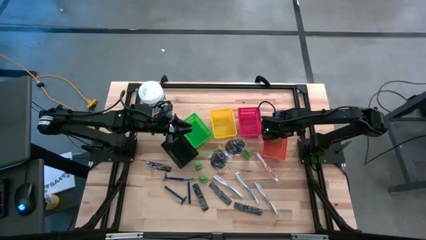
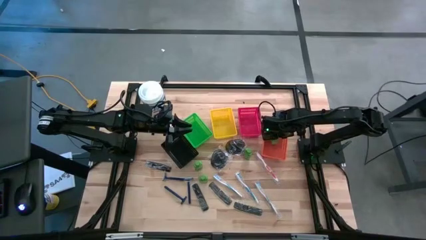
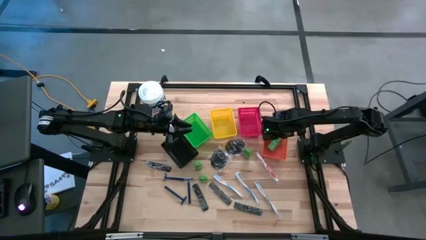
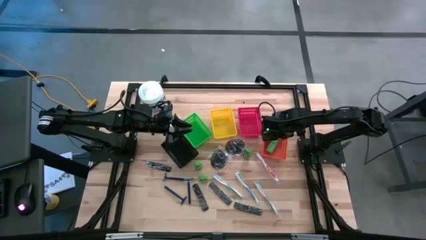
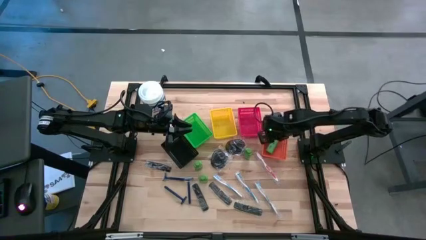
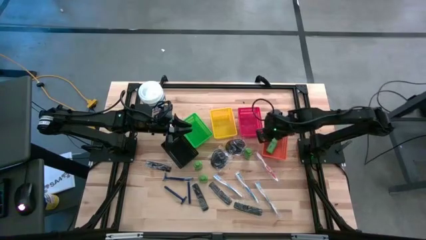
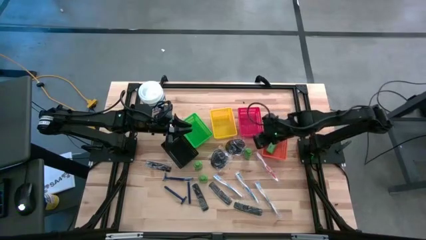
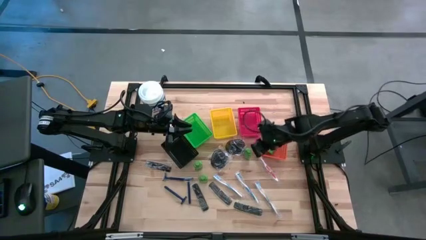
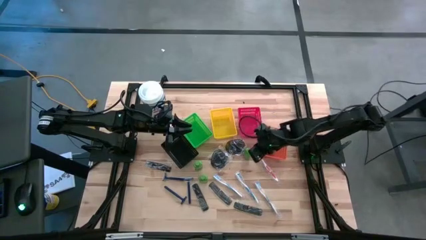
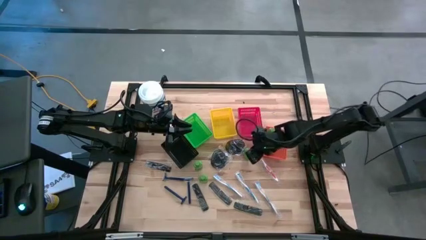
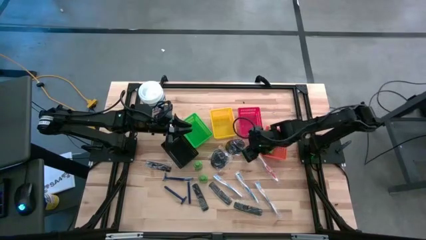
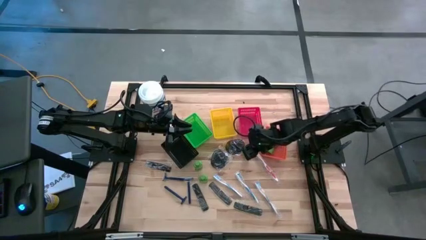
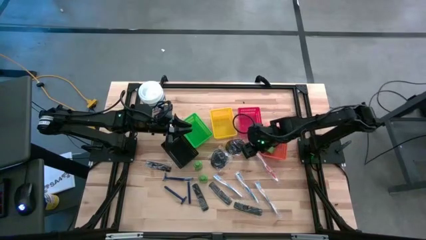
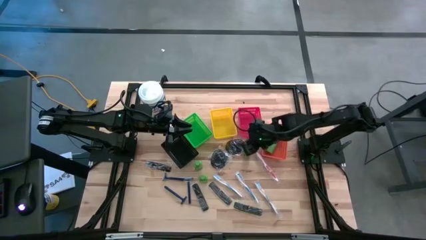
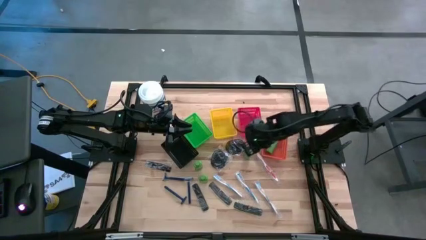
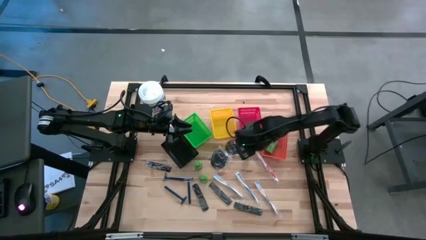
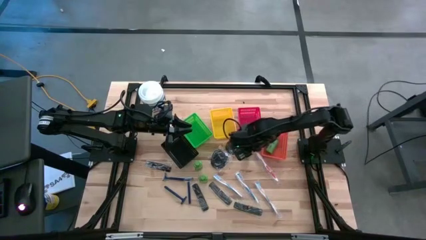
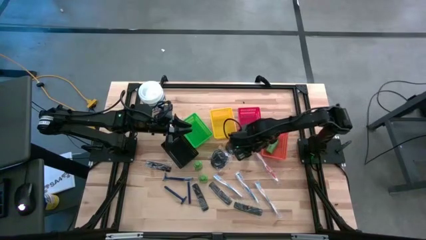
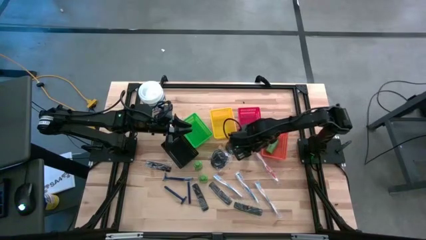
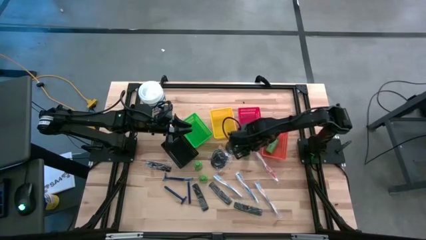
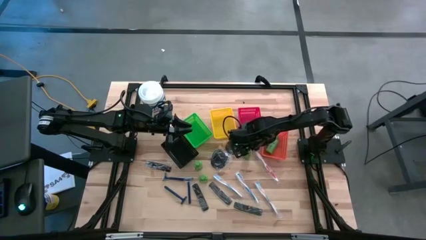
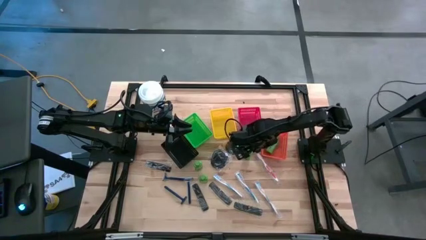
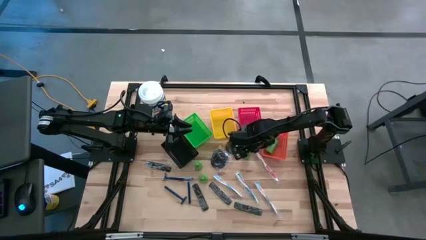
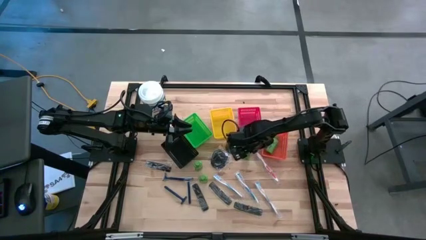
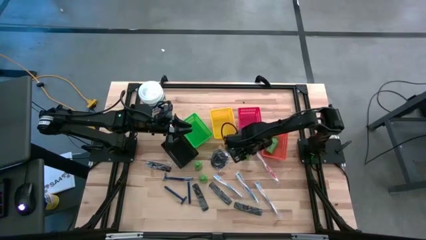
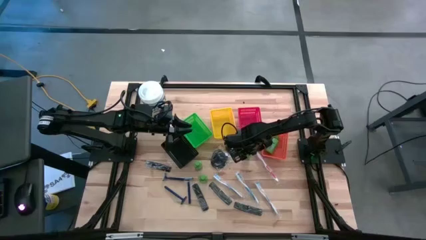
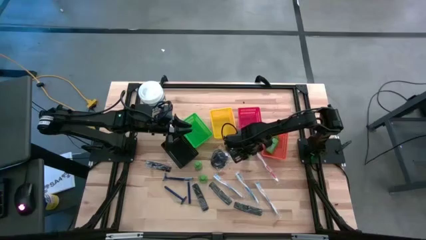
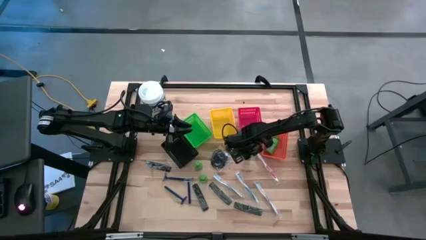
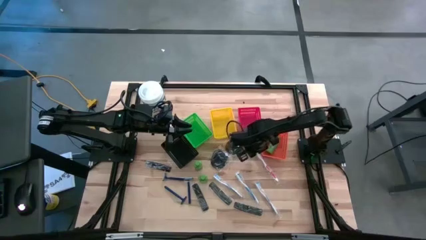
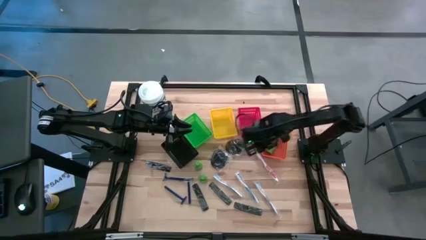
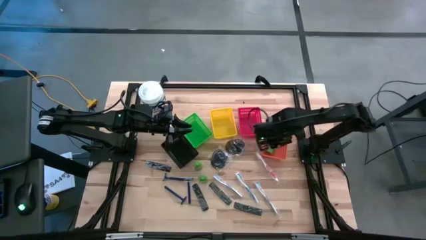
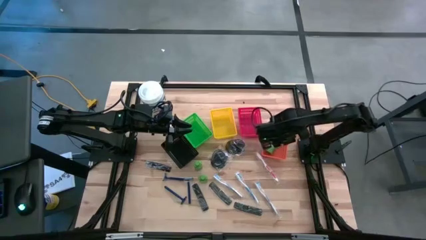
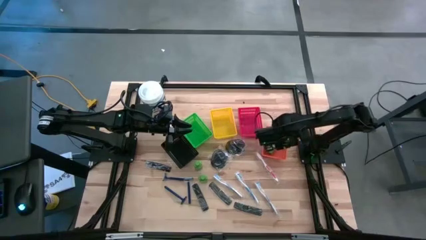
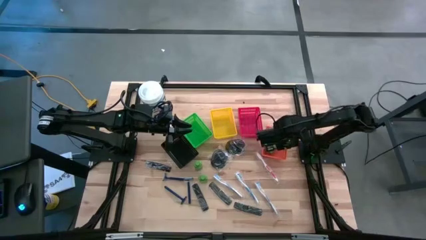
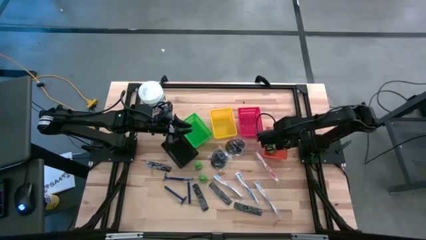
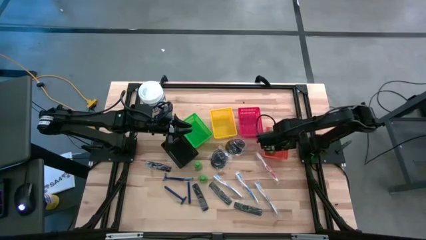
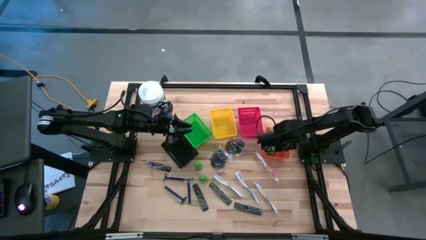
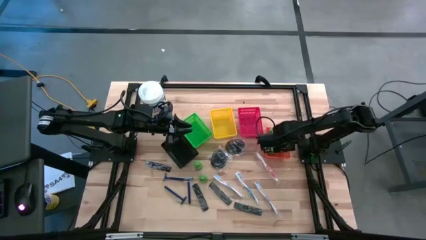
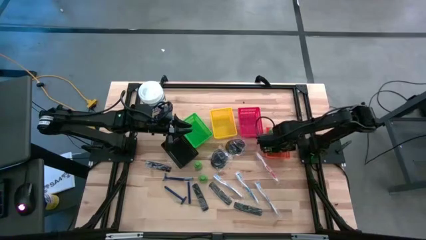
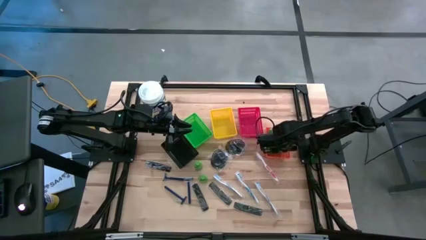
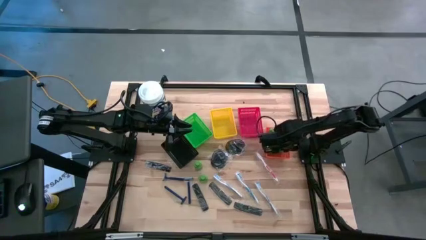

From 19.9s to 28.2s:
Task: Pick & Place Travel size toiletries
Put the green shampoo into the orange bin

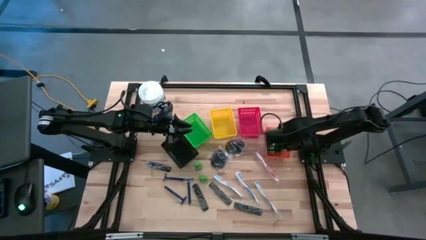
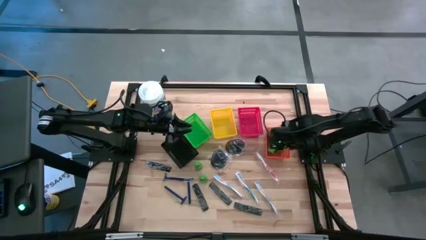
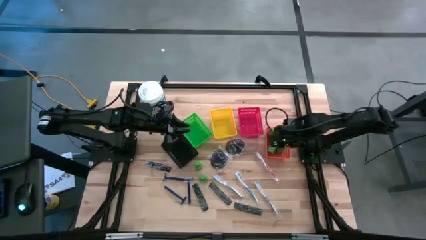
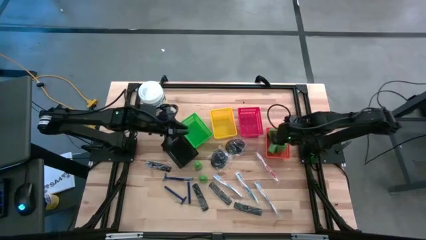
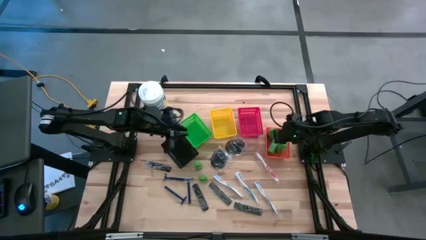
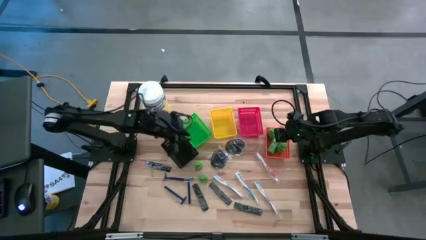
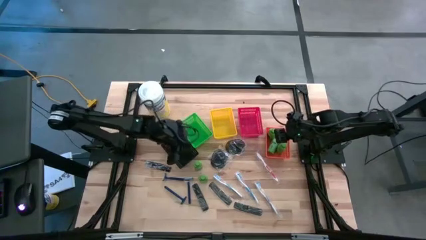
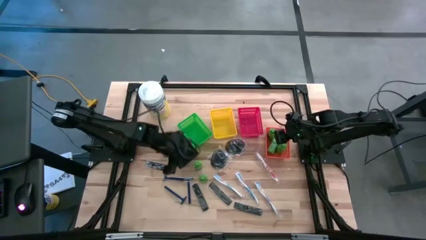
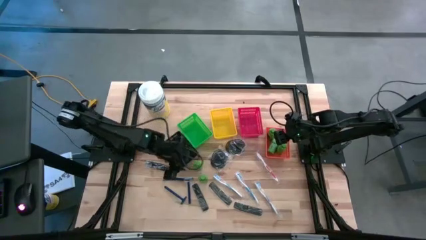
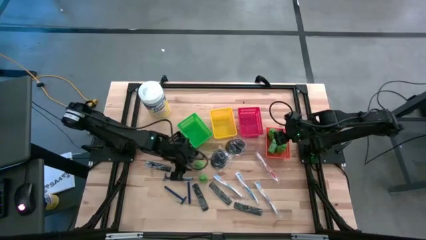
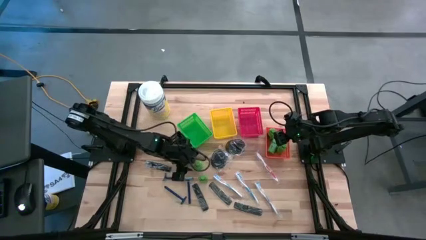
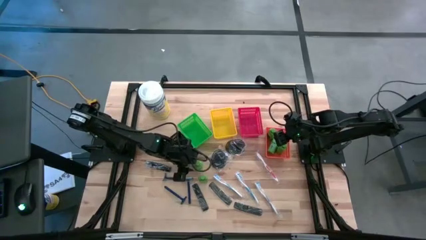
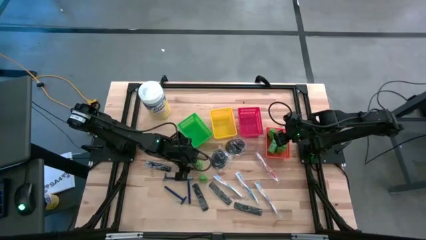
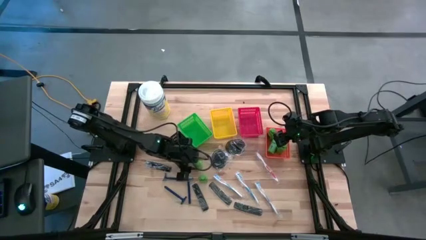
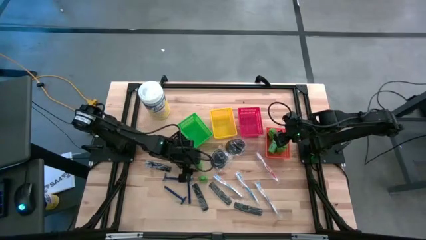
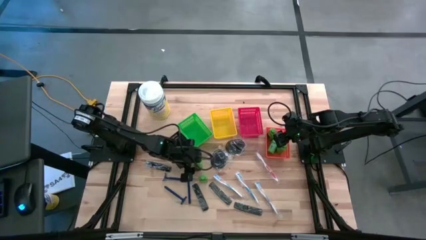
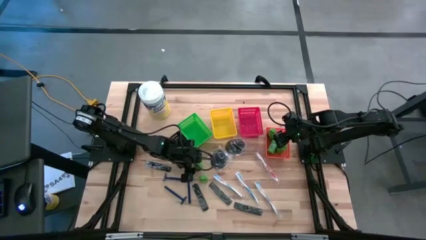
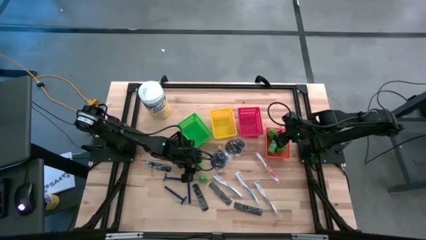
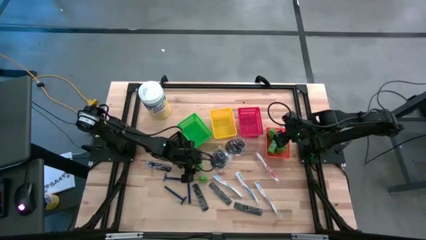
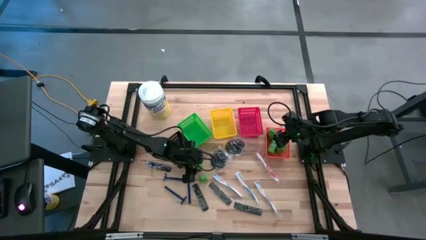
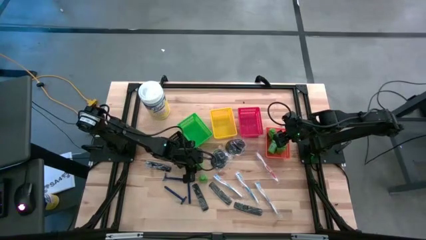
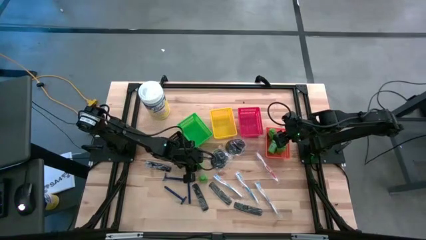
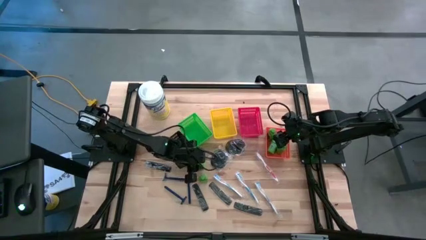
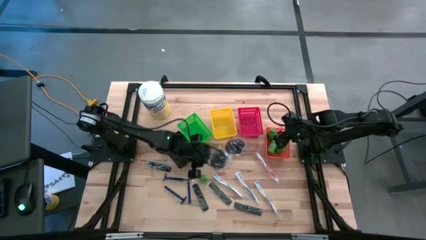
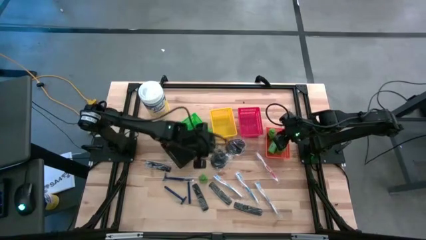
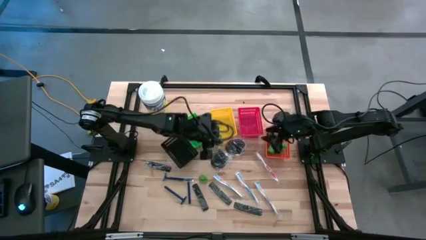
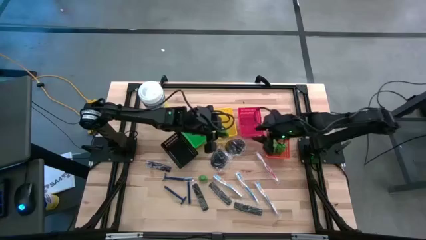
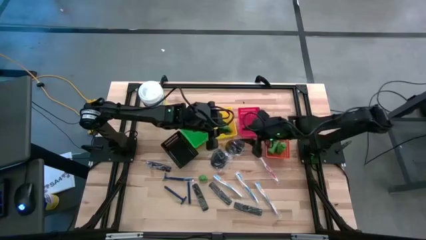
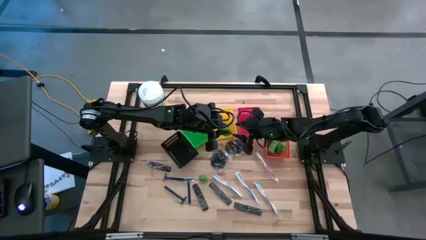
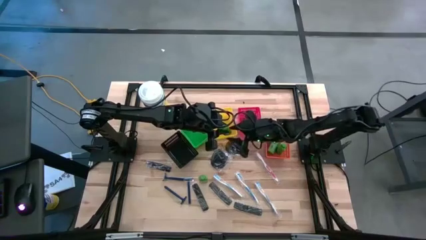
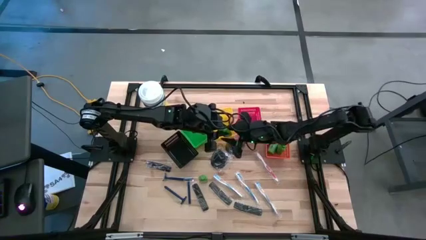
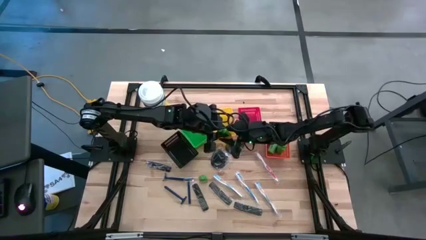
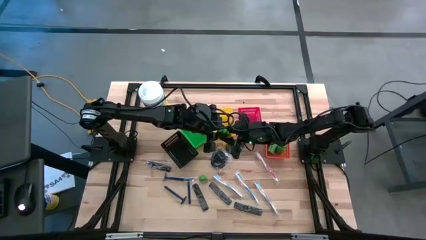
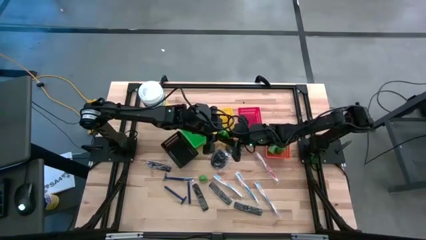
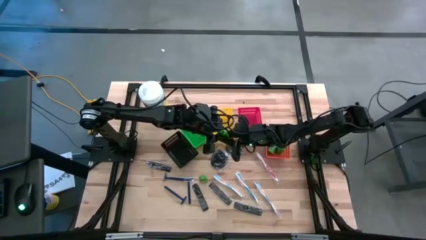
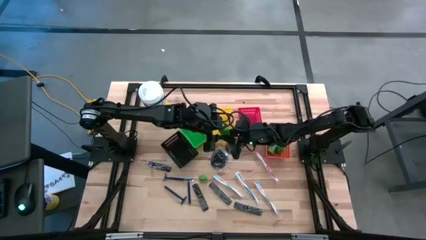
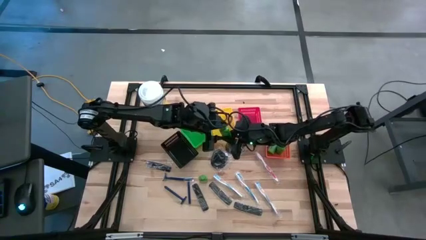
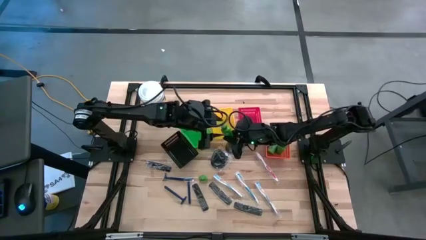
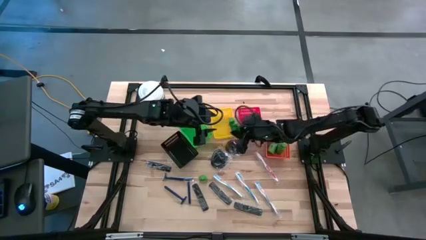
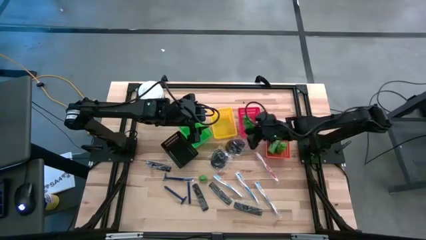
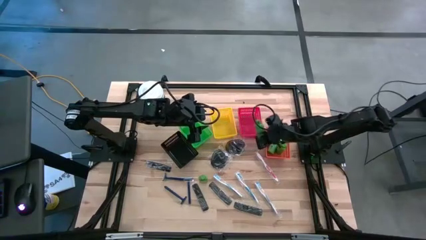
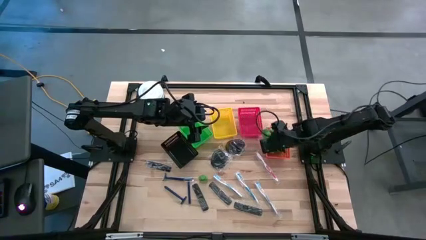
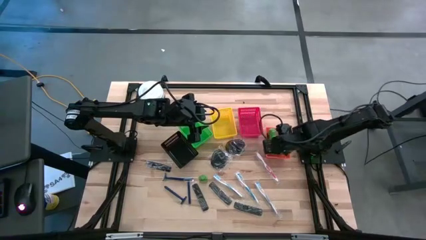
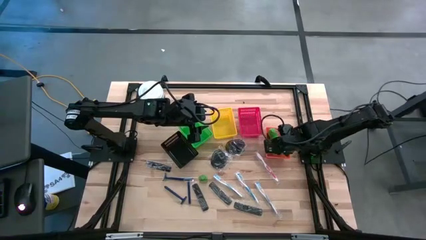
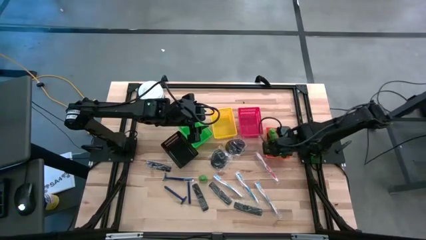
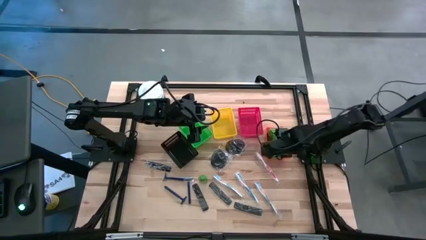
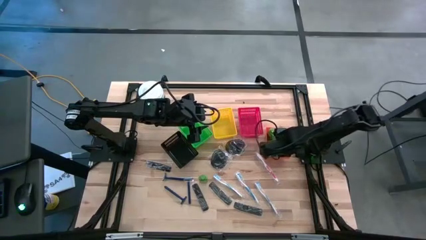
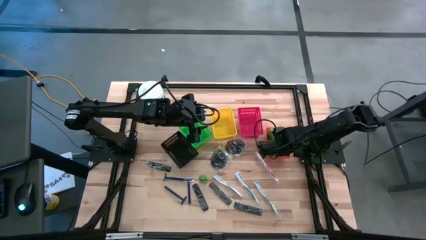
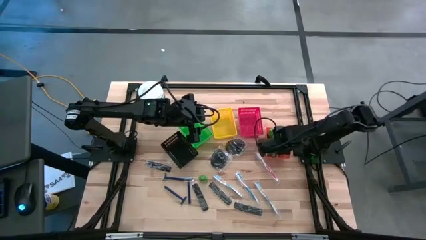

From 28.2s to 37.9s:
Put the green shampoo into the orange bin
